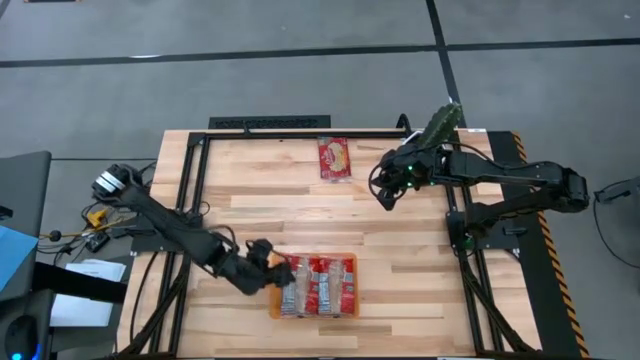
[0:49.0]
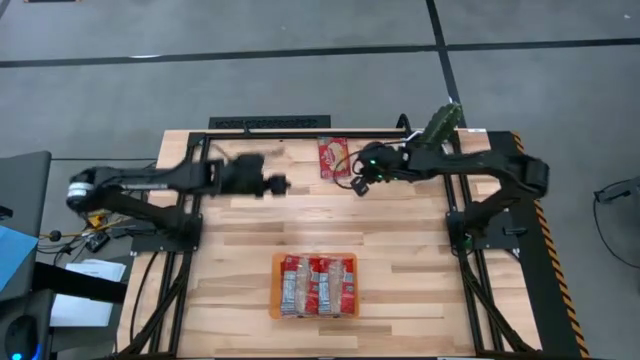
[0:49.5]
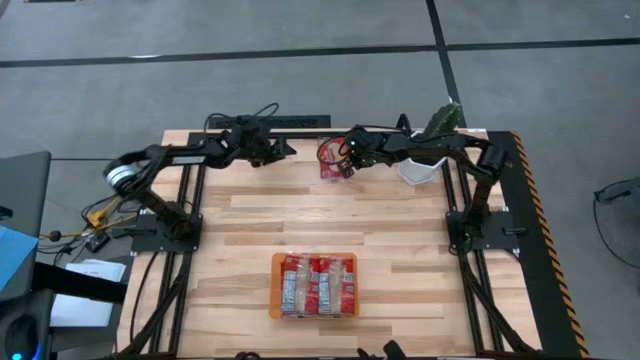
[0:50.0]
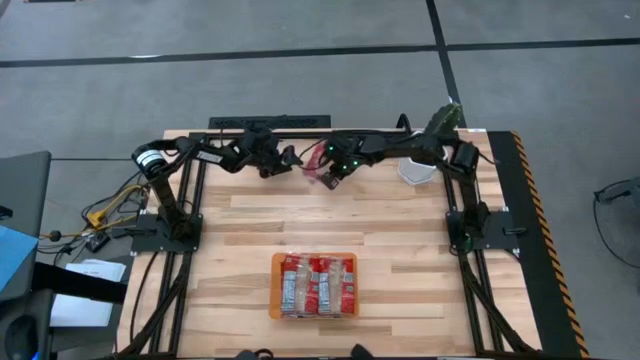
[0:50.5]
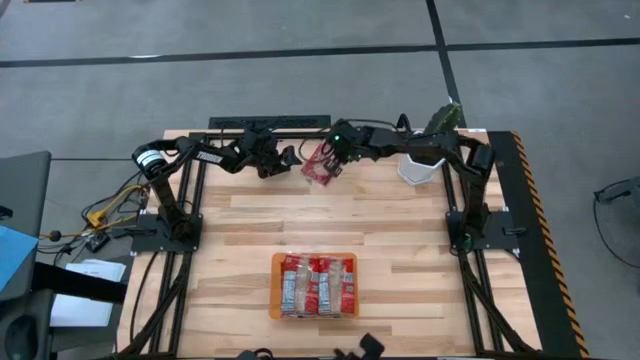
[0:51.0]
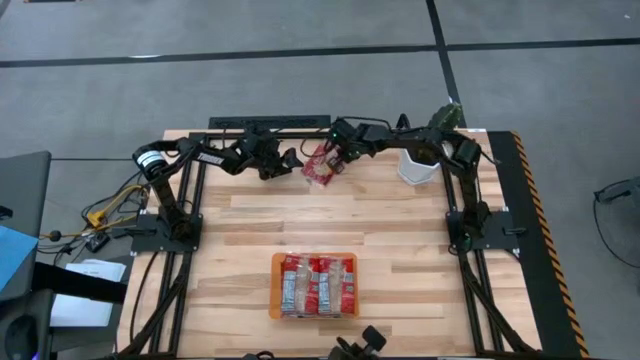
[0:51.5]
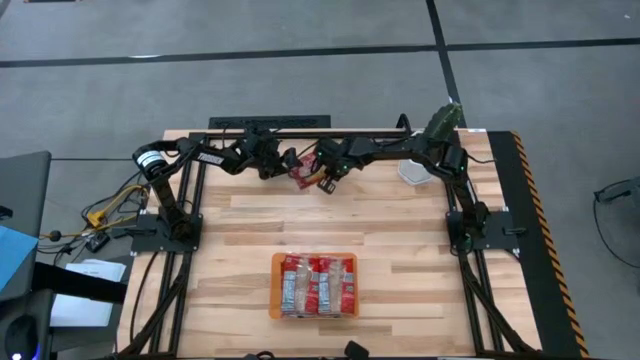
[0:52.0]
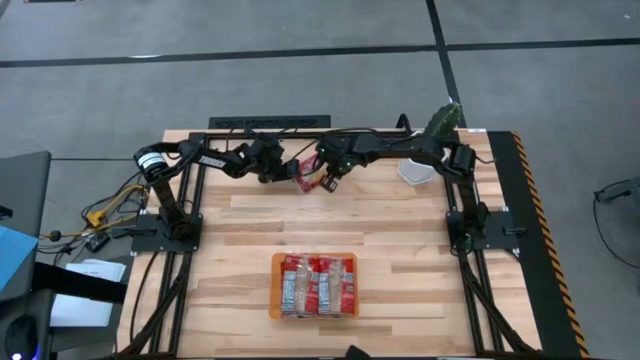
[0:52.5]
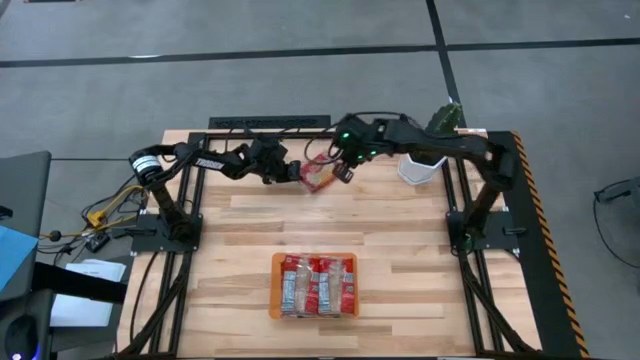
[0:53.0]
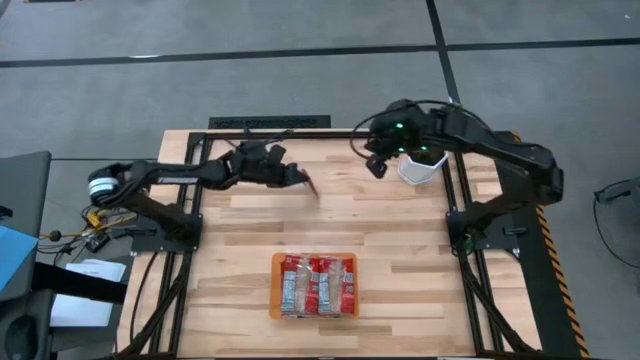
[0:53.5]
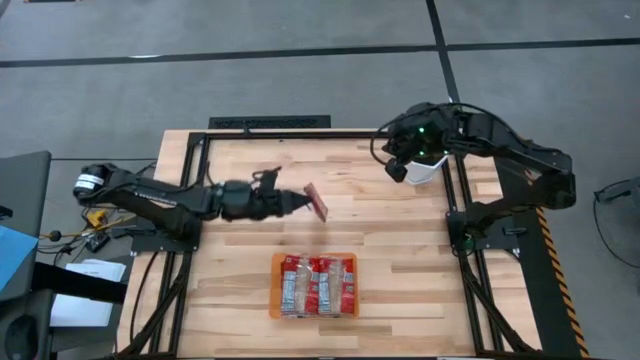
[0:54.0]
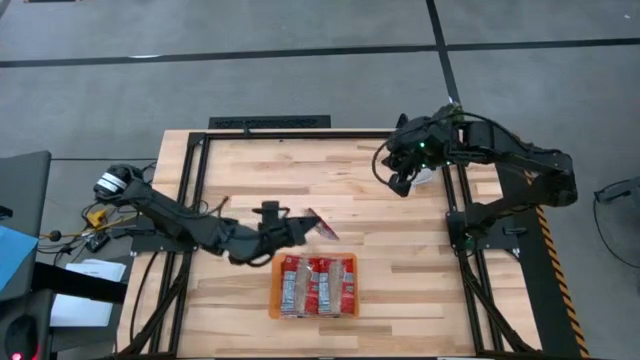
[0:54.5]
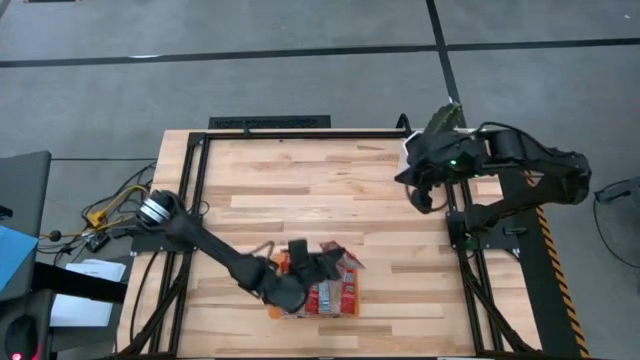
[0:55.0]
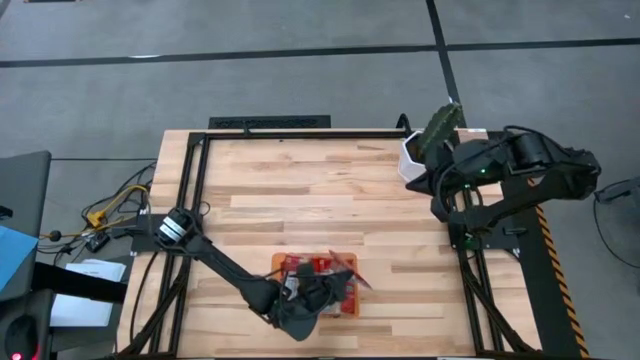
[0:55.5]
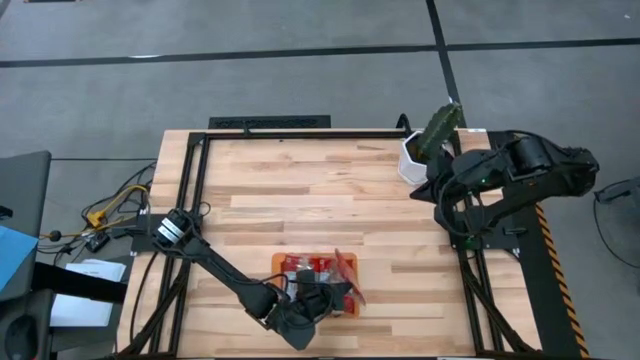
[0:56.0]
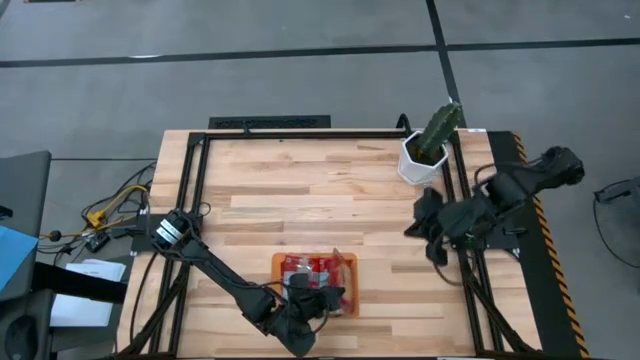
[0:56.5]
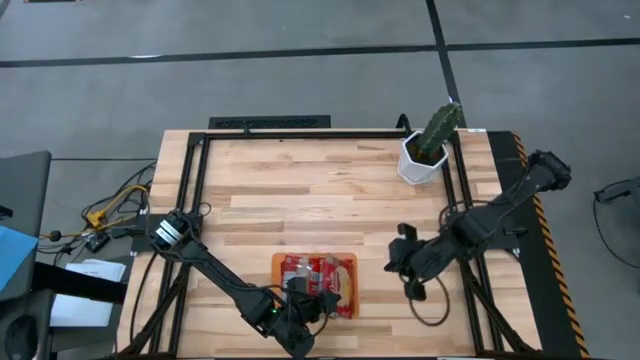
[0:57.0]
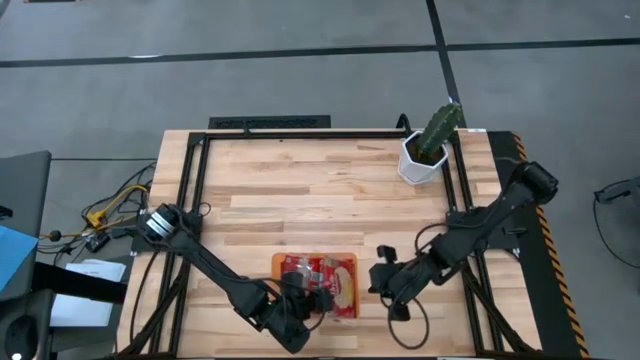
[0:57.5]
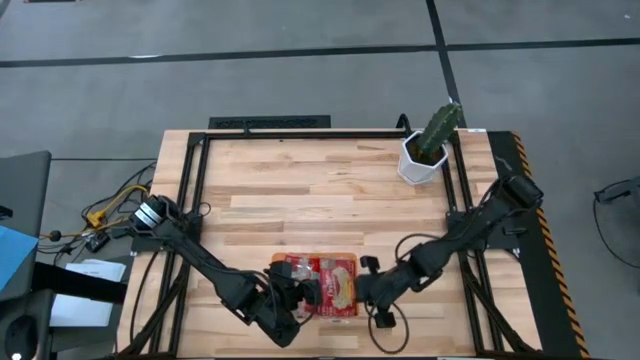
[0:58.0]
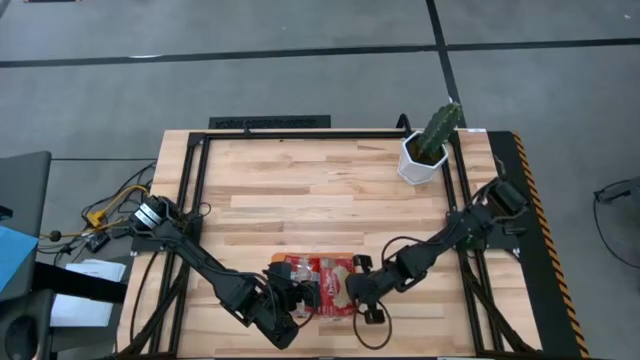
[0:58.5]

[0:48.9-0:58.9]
Task: Sort popcorn bags into baskets
Put the red popcorn bag into the orange bin

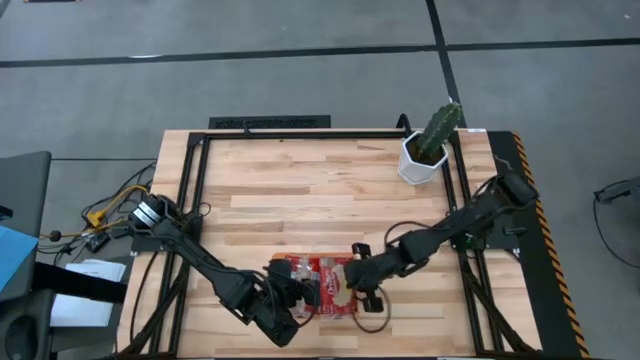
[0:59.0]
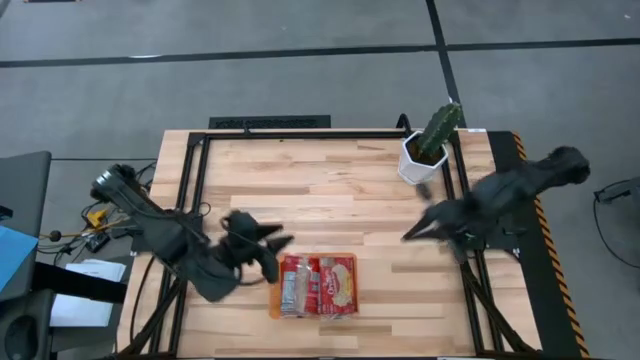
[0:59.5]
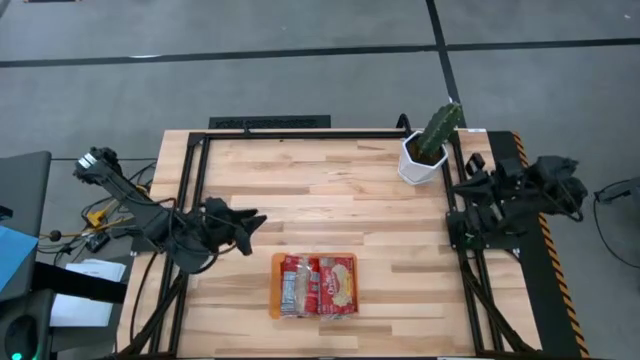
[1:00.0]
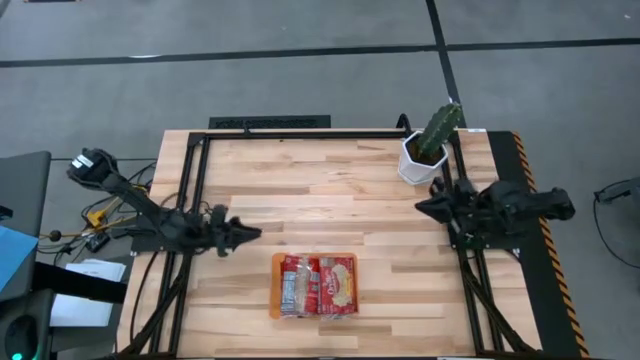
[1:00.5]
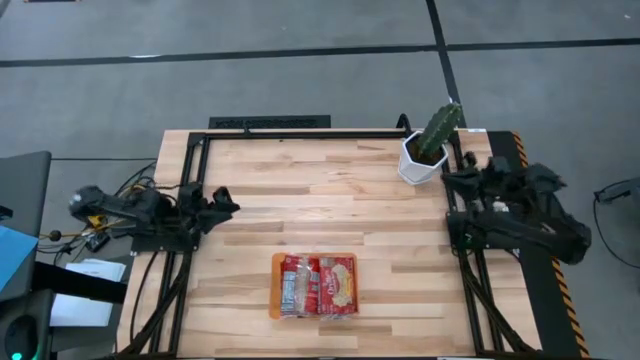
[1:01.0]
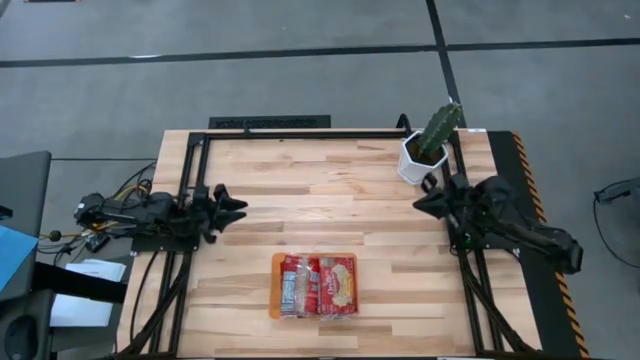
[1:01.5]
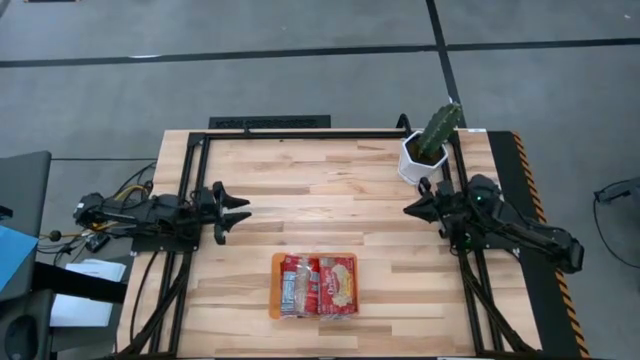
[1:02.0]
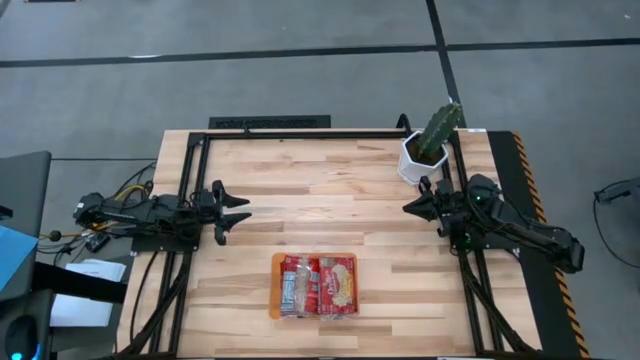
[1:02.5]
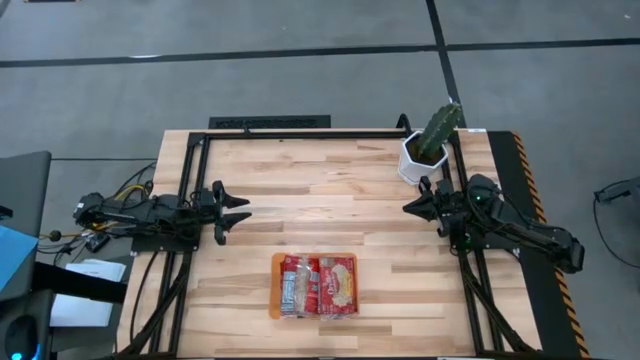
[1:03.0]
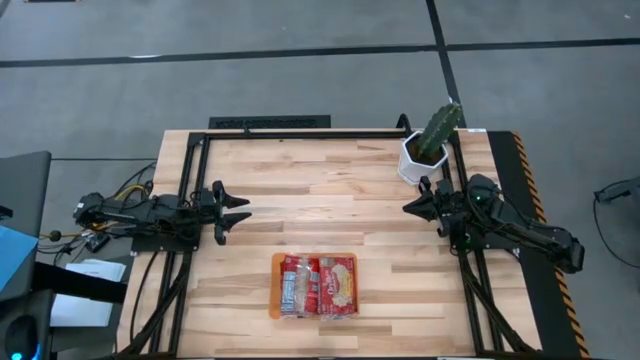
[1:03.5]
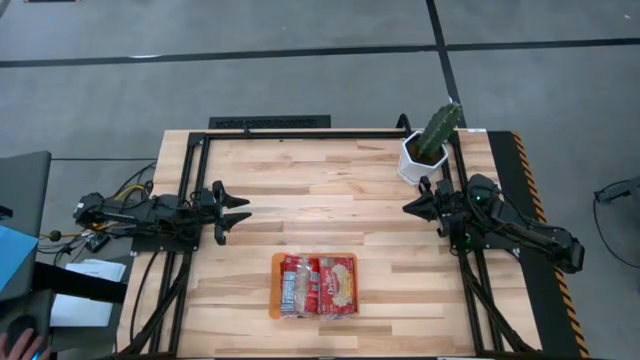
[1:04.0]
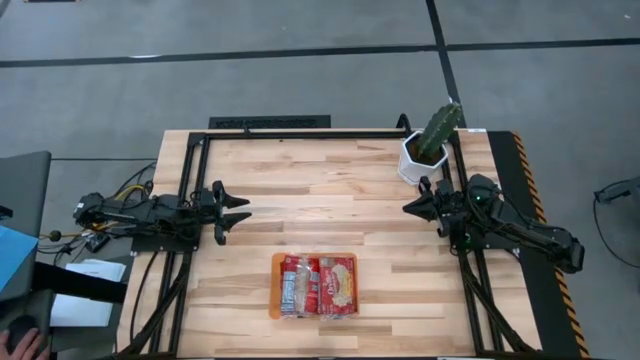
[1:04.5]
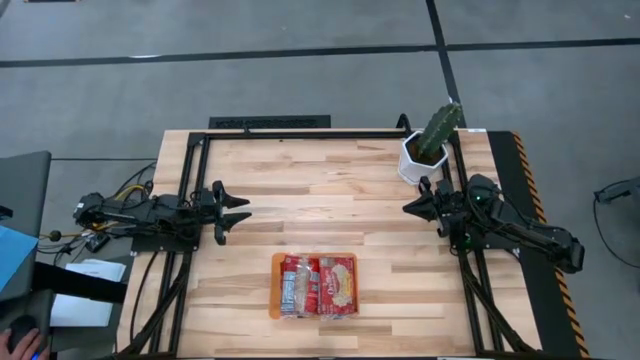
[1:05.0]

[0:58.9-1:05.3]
Return to Home Position

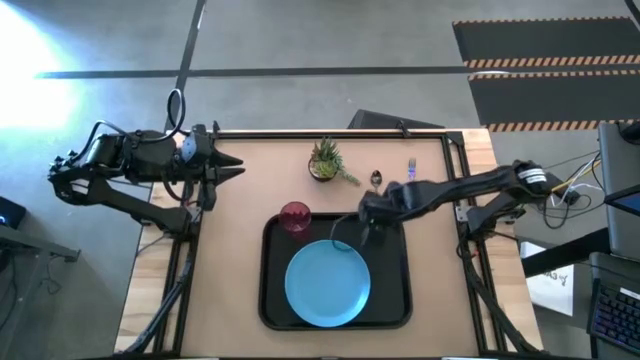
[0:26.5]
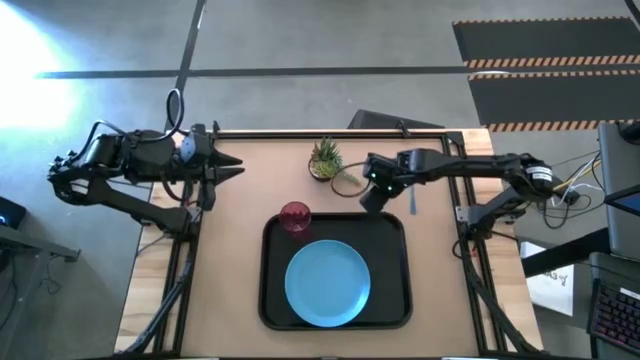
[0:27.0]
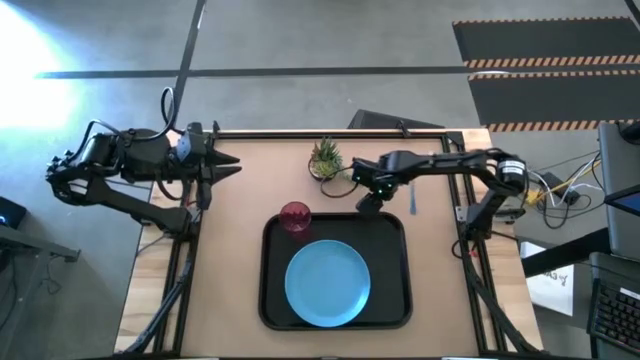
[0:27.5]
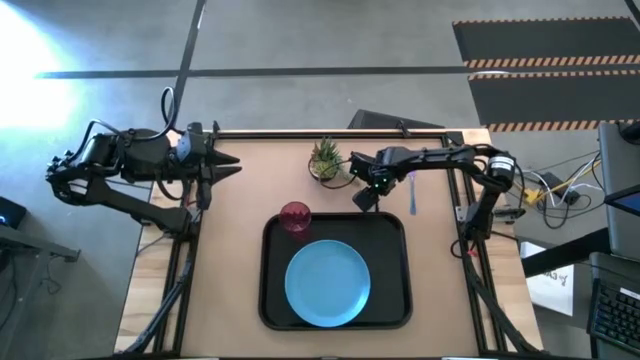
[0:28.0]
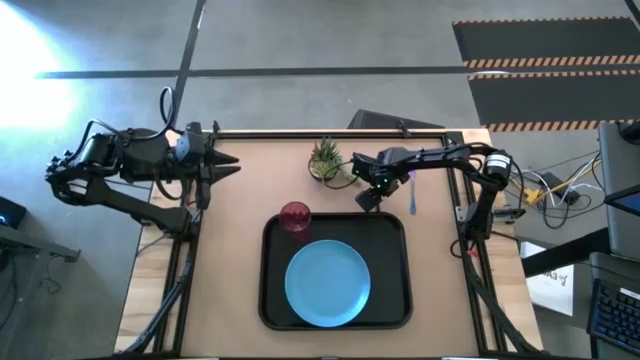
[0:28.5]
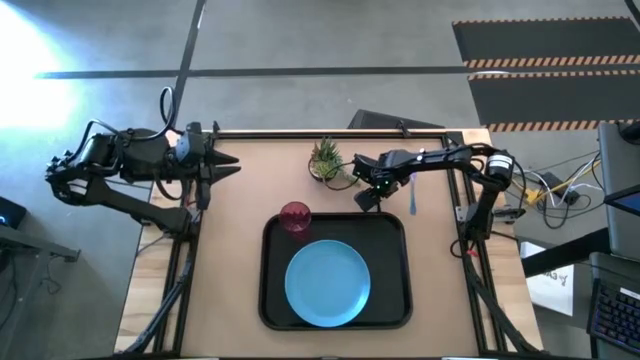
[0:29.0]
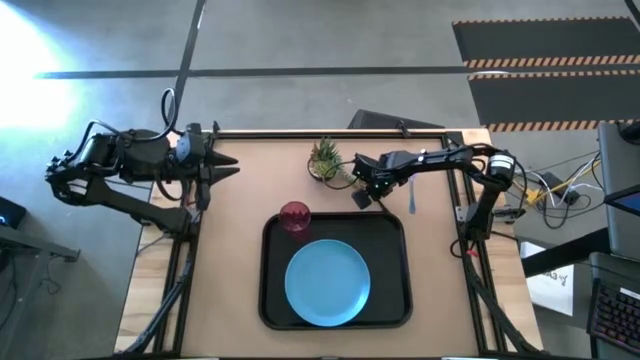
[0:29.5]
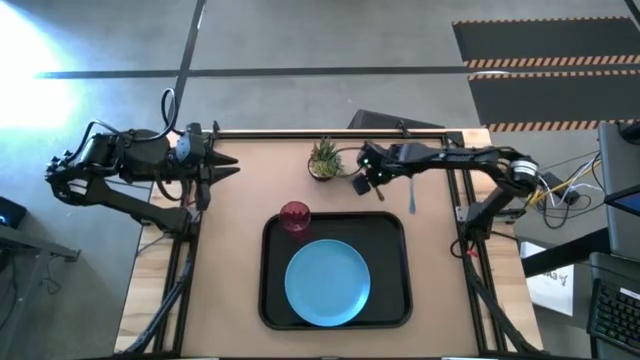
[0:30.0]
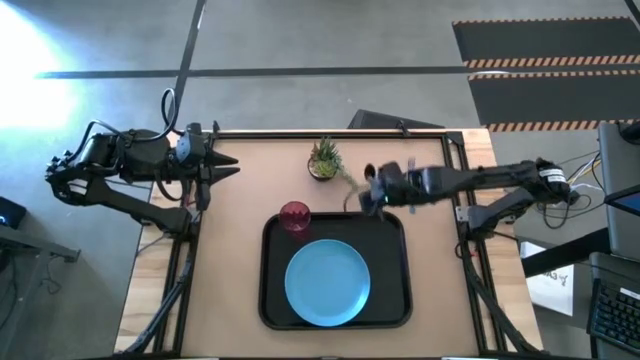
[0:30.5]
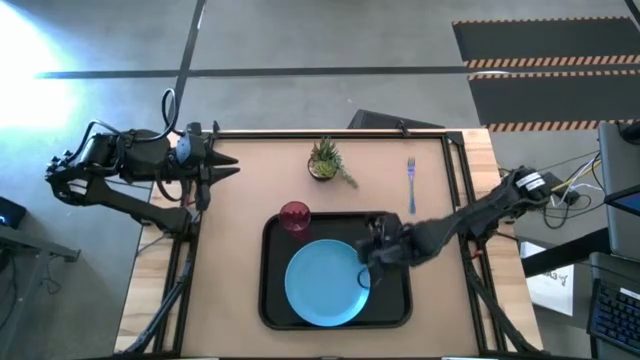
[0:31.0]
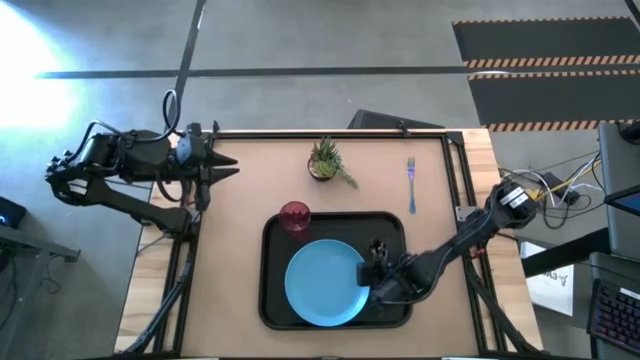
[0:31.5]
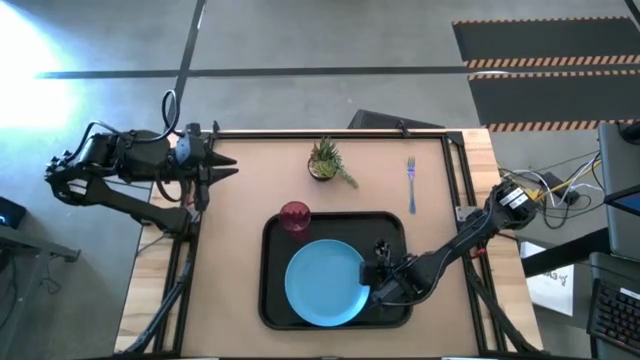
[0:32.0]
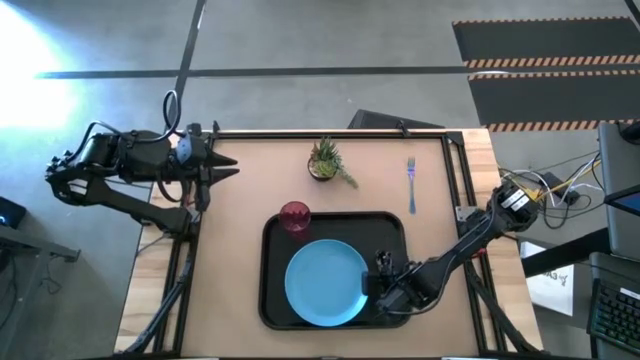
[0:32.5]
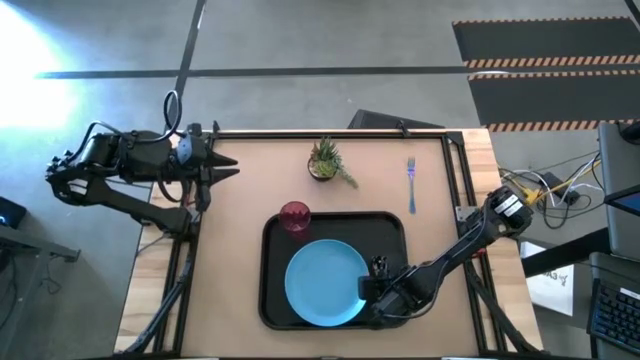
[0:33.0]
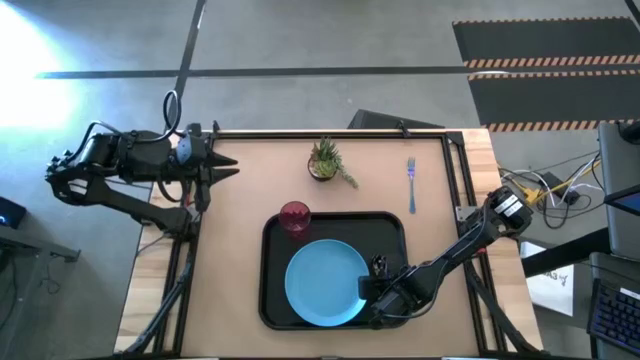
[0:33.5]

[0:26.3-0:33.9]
Task: Pick and place plate/cup/fork/spoon on tray
Put the black spoon to the right of the blue plate on the black serving tray
